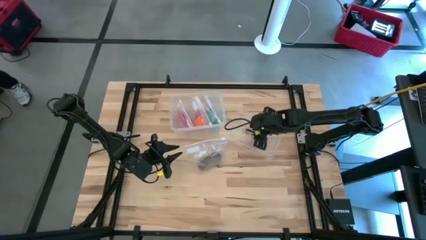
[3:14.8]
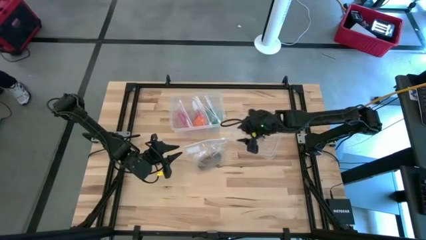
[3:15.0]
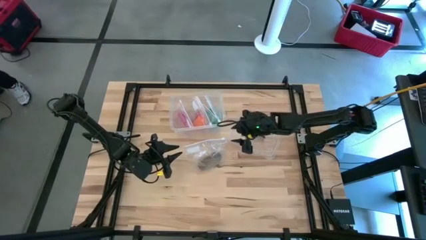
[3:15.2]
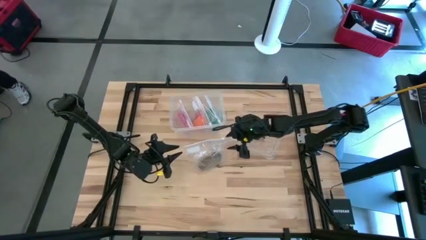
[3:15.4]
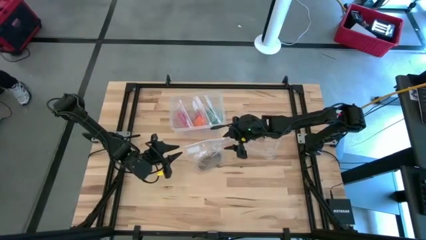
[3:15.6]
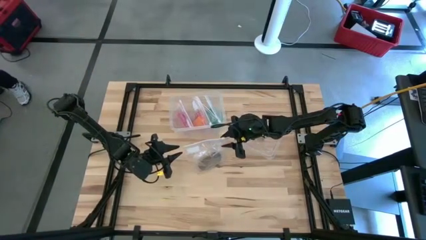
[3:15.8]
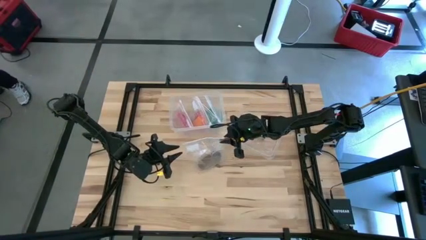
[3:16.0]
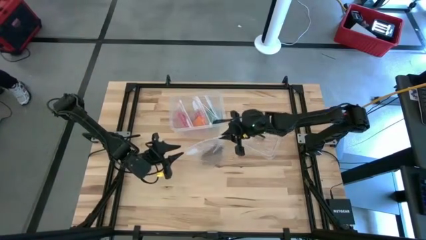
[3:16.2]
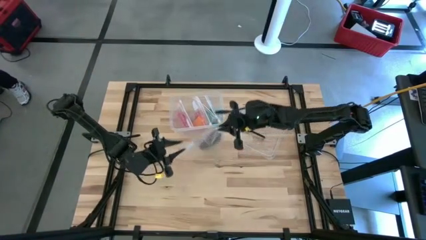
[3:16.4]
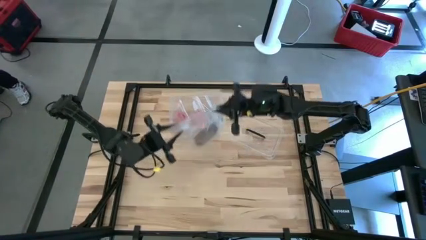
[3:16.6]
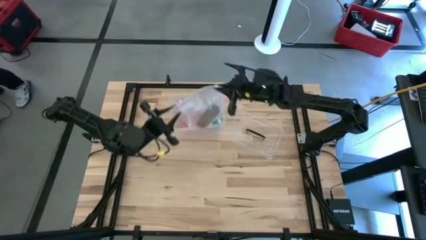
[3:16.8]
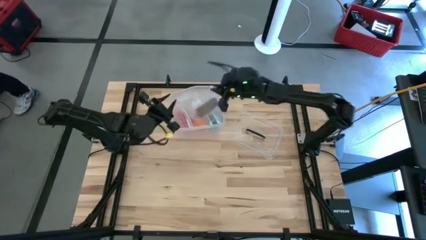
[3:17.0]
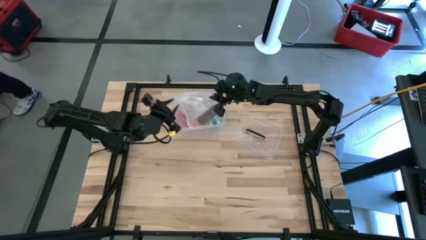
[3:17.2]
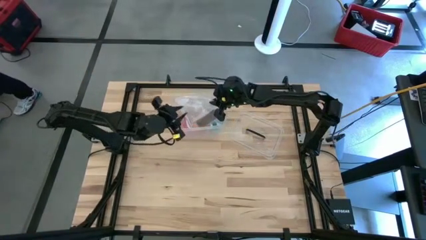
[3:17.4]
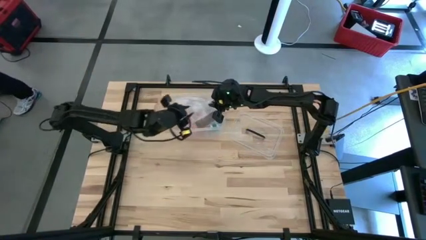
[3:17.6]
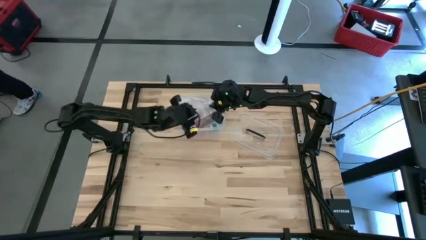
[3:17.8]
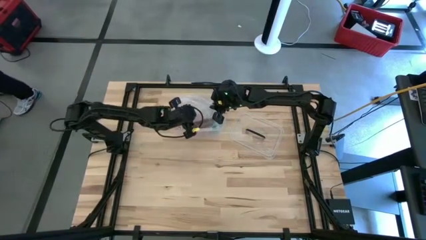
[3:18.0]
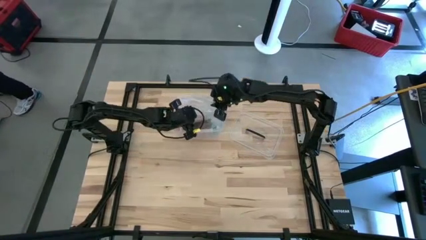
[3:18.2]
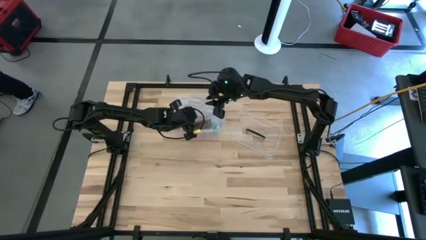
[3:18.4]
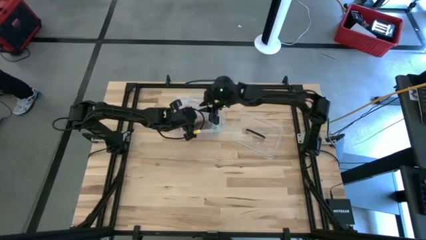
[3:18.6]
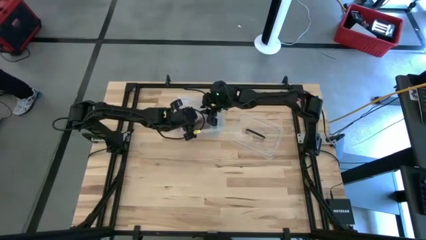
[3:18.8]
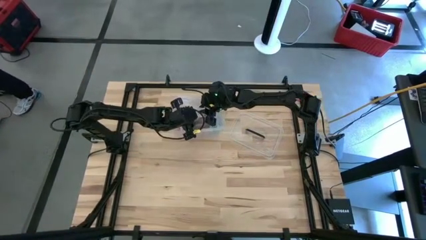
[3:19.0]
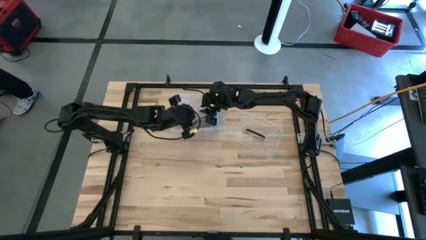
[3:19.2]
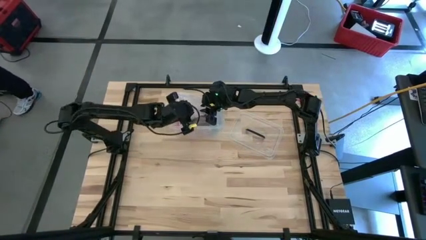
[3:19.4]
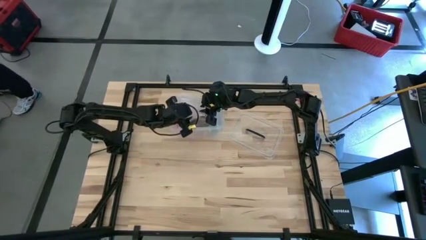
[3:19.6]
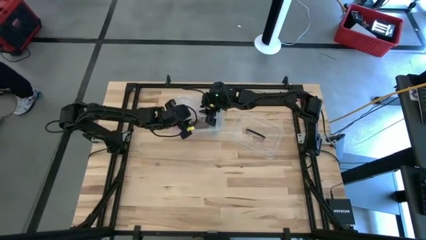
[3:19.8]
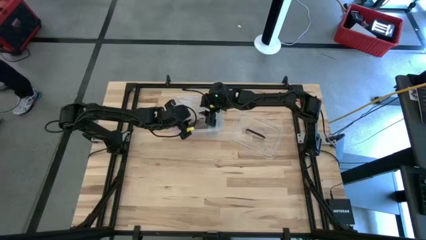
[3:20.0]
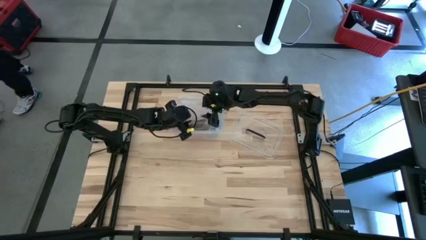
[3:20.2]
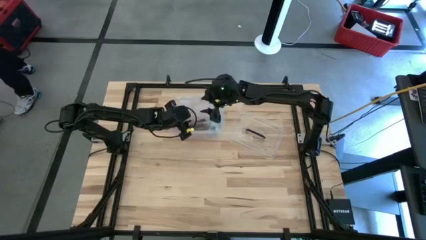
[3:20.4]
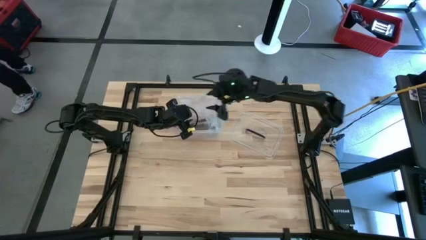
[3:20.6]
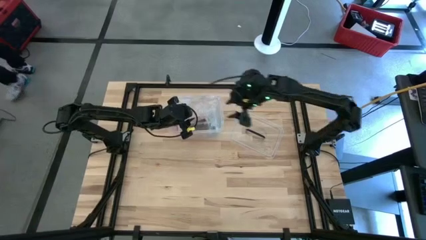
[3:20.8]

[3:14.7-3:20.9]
Task: Roll bandage
Put the packed rolled brown bandage into the transparent container

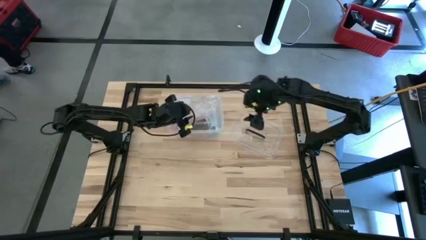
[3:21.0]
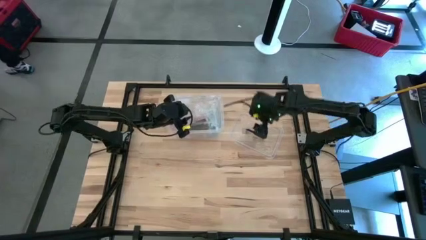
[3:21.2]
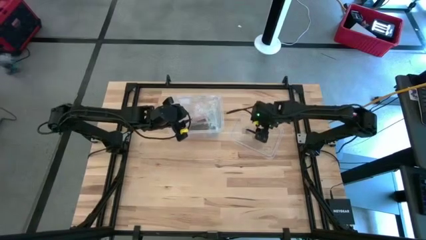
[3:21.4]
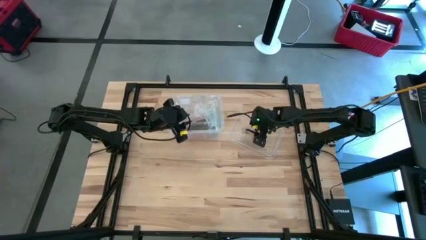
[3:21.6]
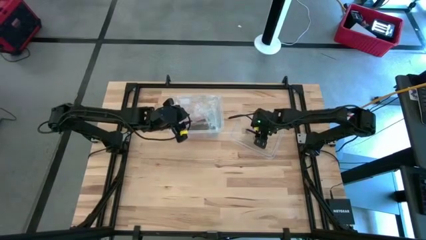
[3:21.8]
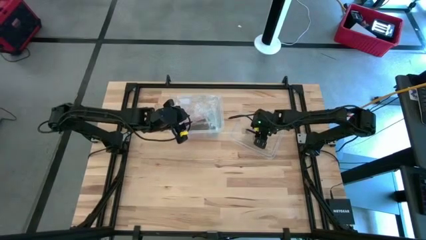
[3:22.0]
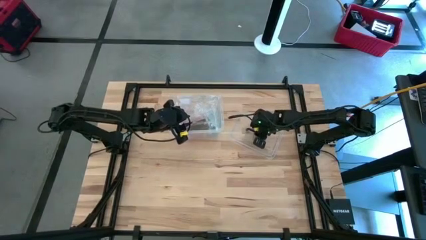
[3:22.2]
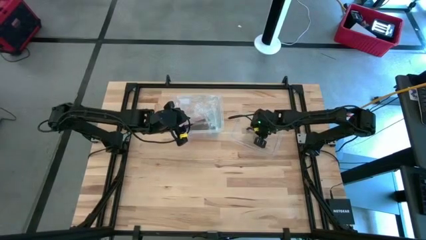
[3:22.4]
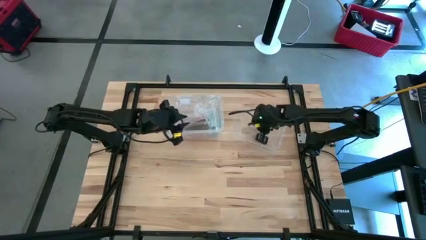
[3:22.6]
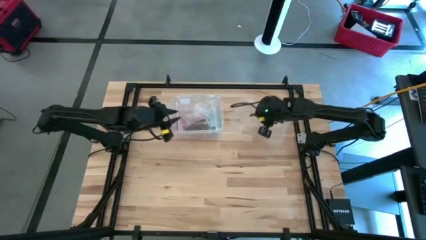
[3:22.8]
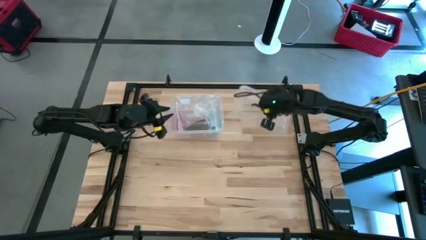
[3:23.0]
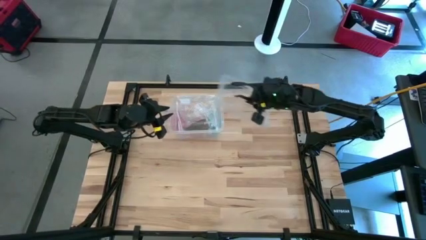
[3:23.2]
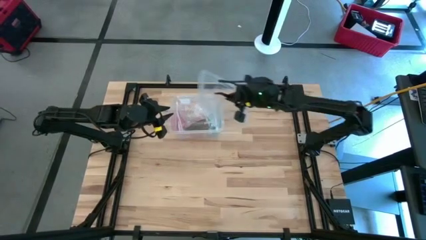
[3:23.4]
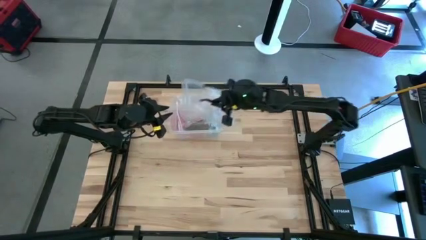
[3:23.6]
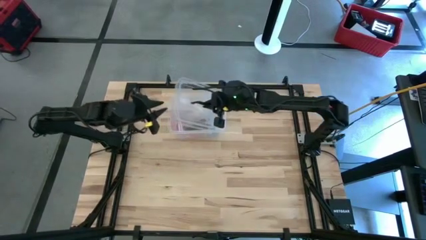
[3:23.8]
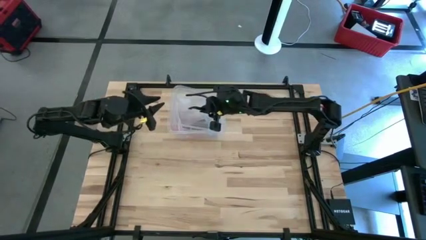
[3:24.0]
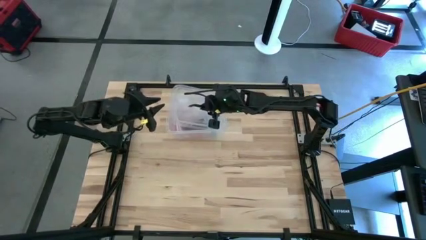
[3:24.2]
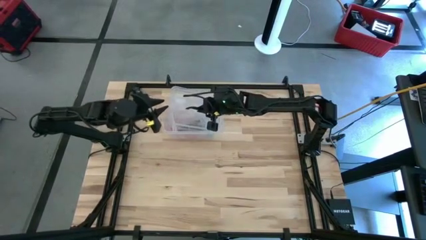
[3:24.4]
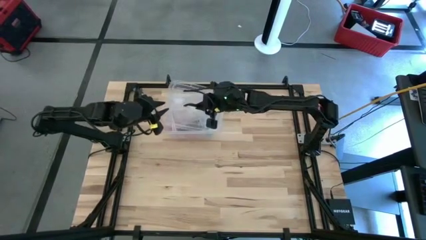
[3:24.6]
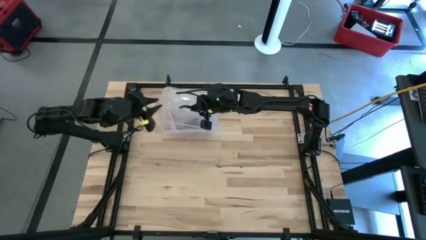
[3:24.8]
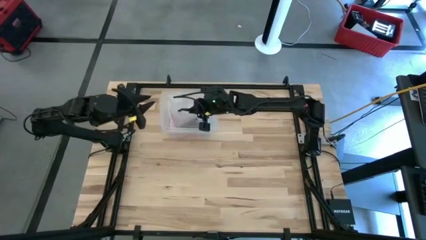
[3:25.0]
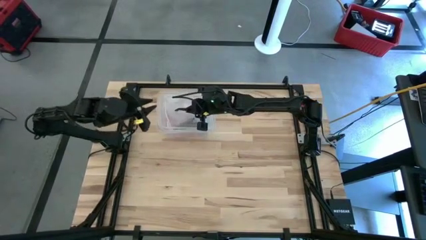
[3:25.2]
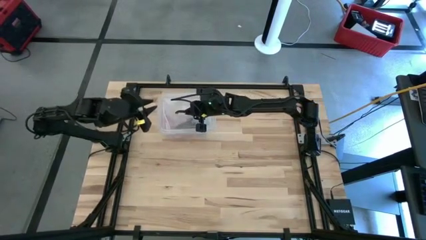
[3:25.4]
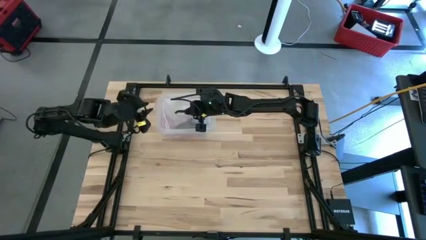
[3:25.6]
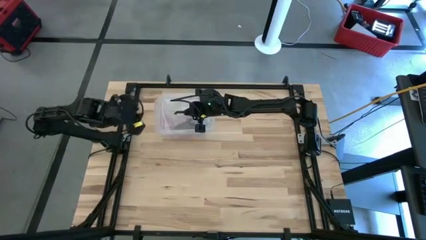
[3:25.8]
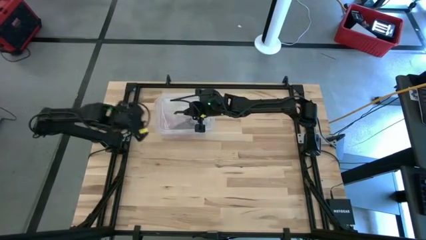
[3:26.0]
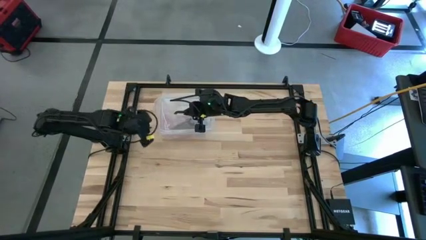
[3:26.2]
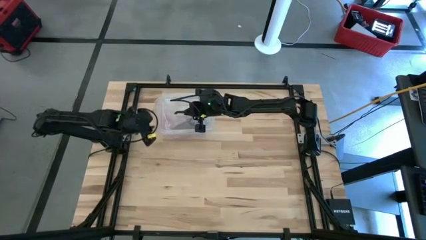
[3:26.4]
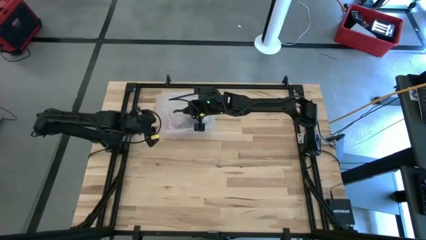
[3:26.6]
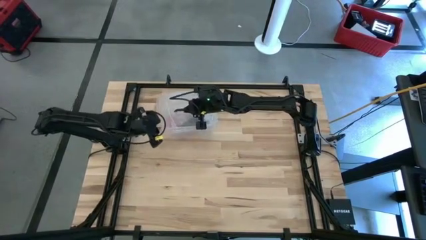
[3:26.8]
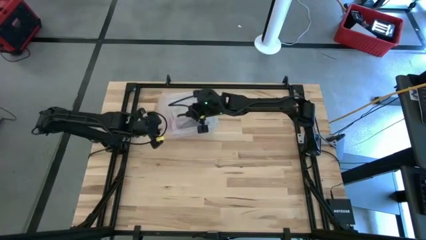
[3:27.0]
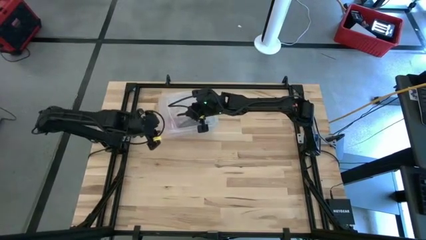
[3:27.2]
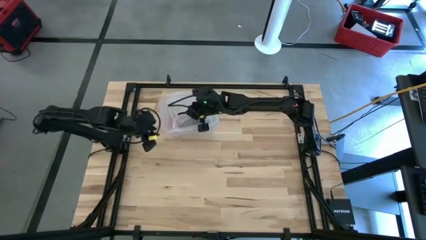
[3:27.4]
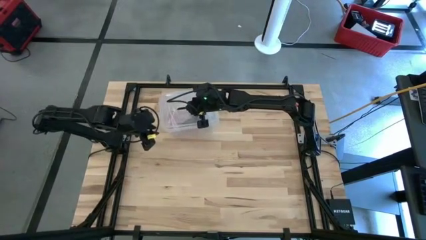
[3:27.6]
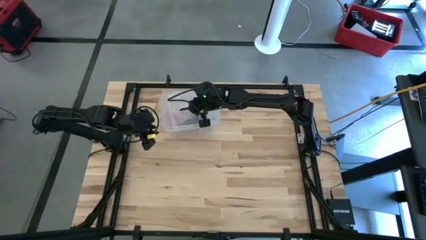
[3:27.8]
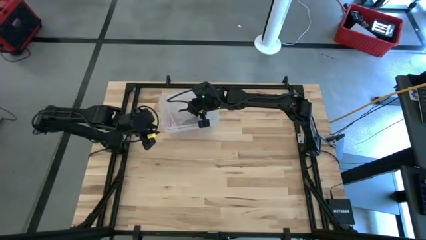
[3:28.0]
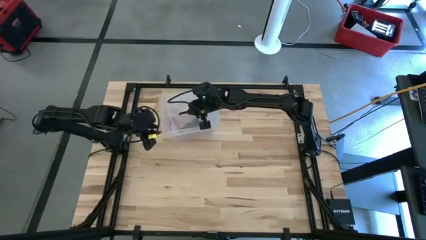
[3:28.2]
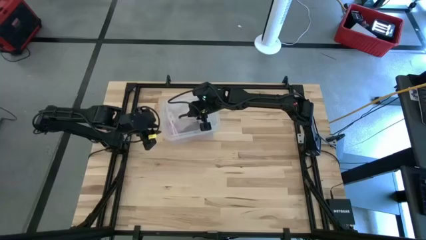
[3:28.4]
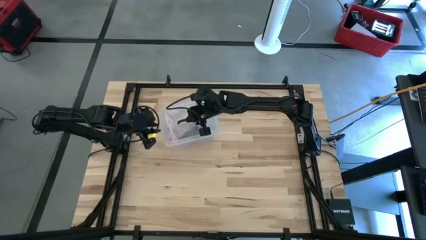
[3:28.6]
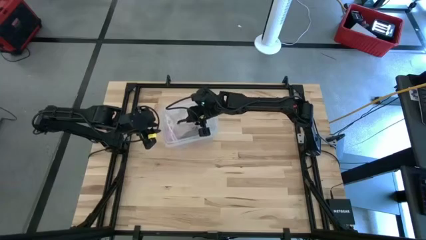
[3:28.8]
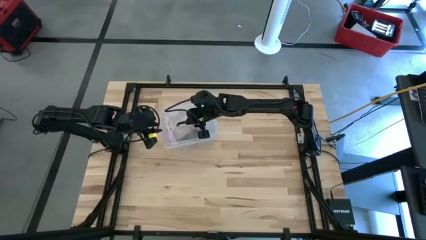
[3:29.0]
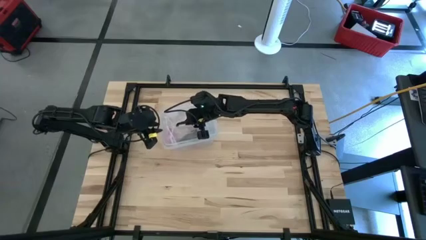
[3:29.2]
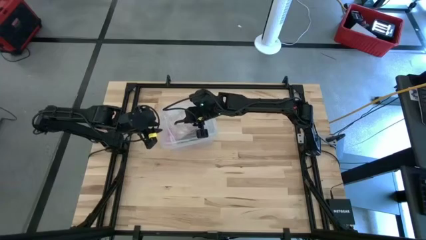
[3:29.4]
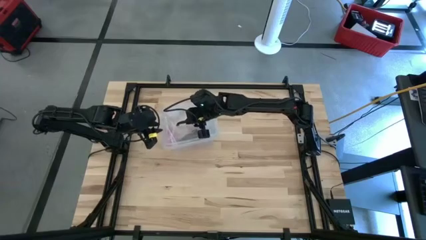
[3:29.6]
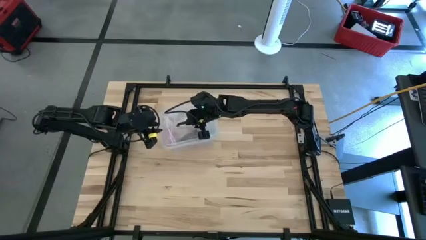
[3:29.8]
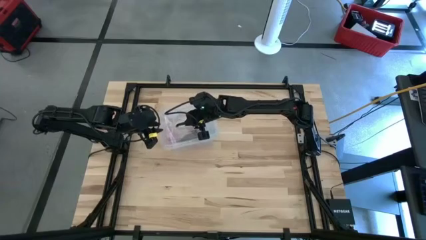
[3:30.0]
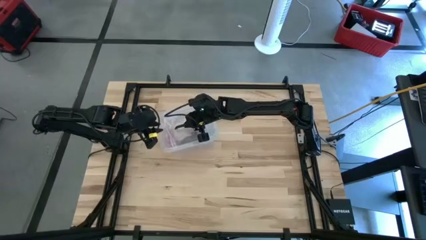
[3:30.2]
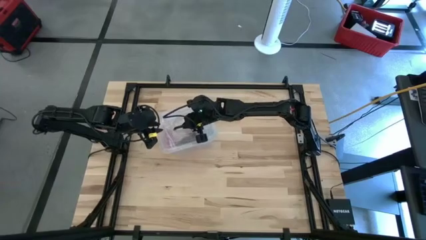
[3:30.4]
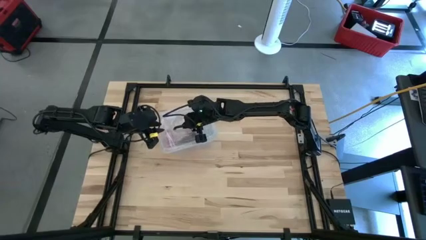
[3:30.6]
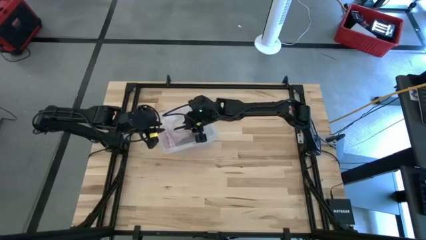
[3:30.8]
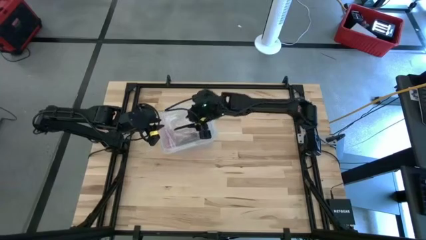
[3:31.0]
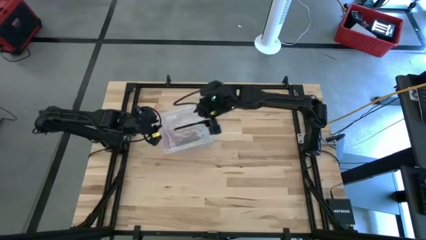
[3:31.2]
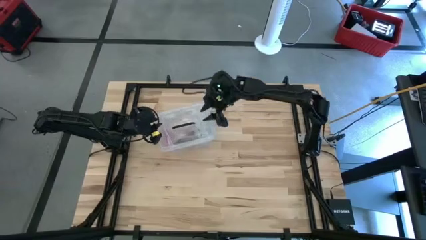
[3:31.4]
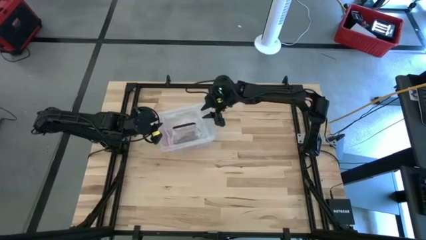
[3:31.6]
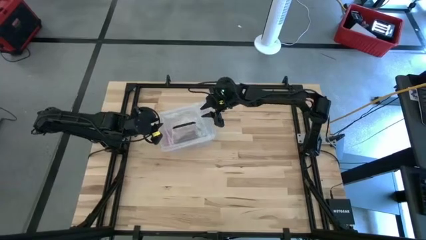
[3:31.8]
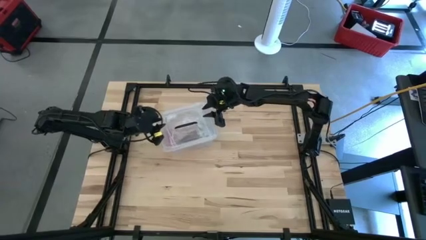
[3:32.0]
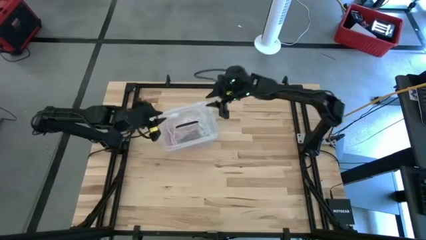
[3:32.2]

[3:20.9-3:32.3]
Close the transparent container
